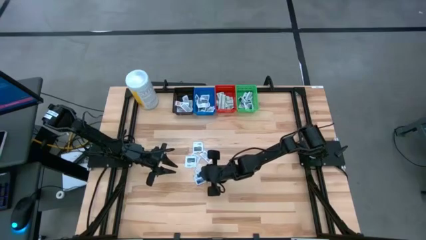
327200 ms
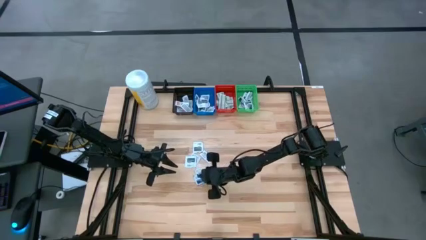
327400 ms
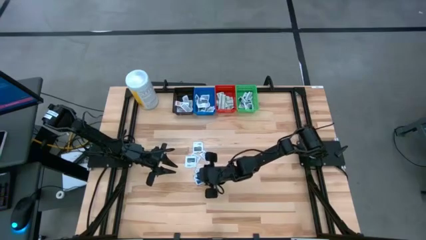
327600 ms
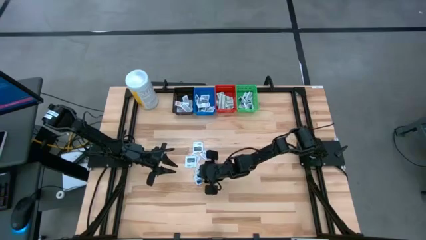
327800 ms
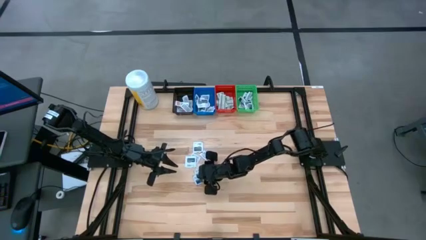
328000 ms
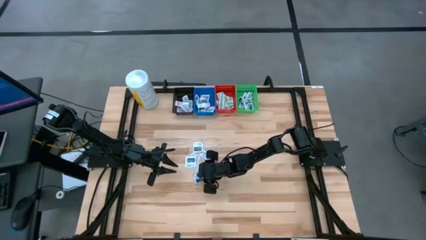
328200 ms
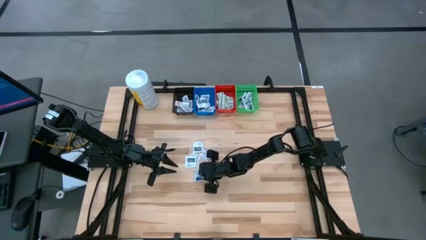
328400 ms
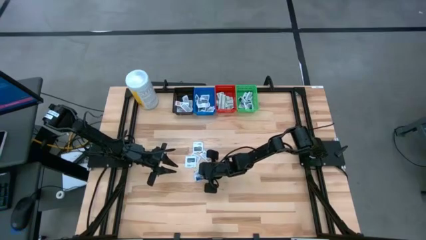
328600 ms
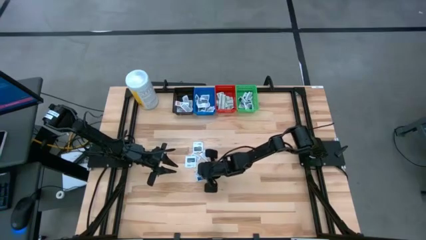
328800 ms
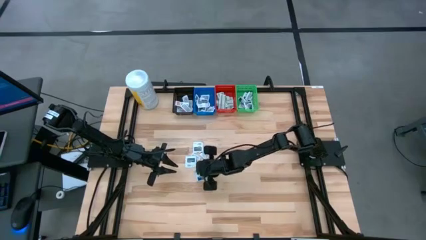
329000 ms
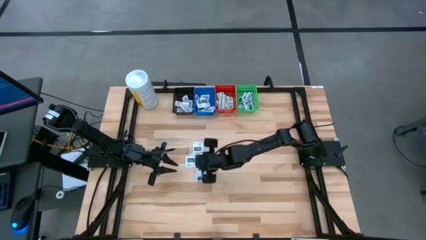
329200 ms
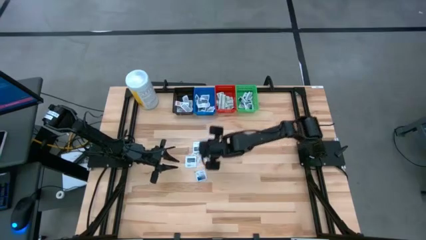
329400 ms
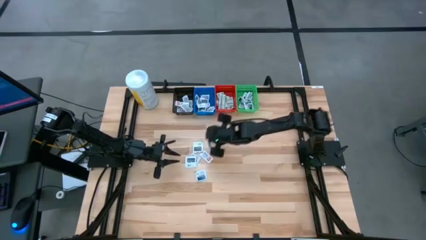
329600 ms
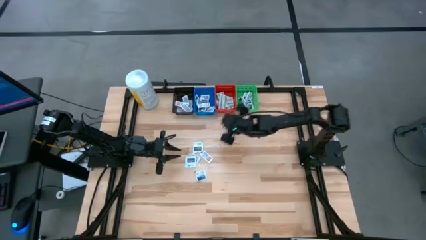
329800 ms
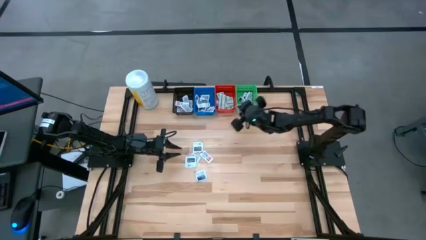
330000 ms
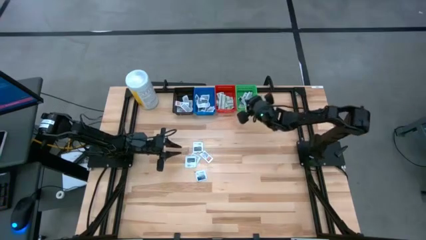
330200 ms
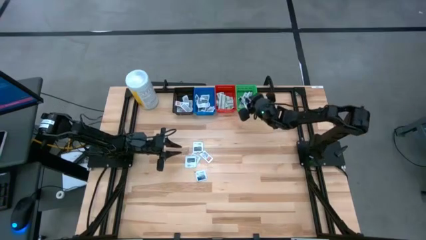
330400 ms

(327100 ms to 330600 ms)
Task: Pick & Place First Aid Supplies
Put the blue alcohol pad into the green bin

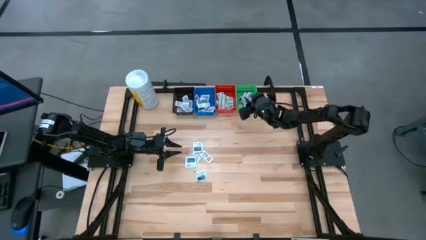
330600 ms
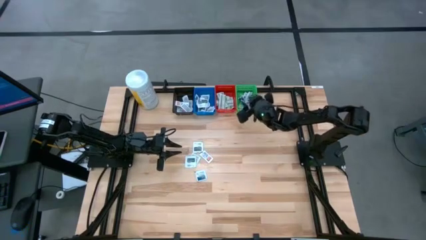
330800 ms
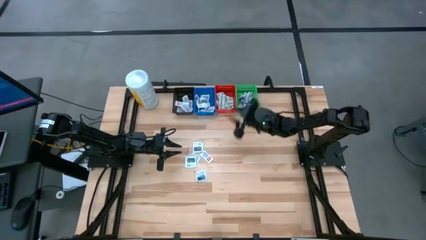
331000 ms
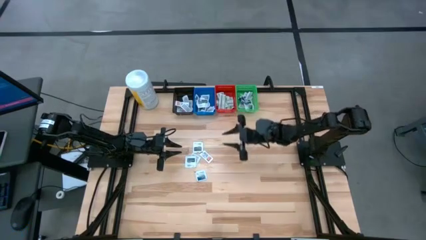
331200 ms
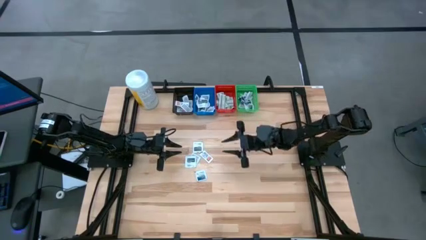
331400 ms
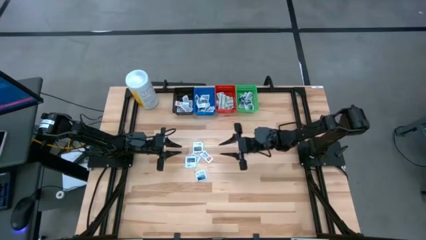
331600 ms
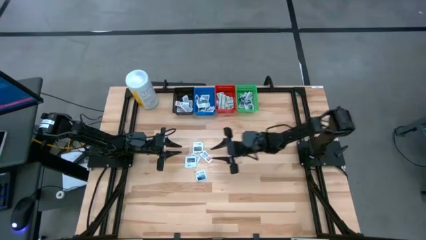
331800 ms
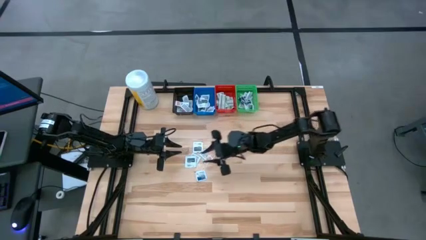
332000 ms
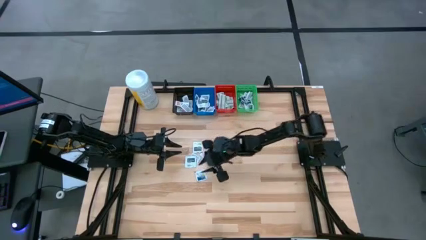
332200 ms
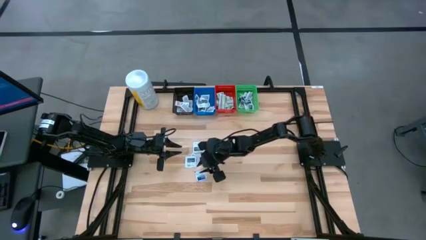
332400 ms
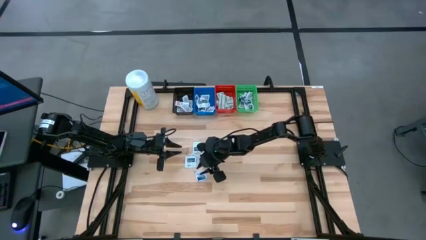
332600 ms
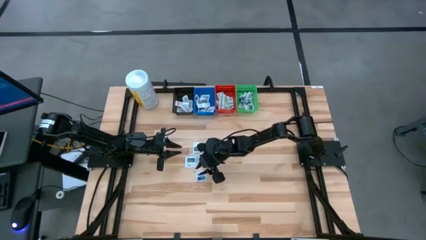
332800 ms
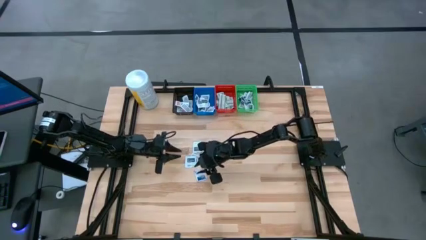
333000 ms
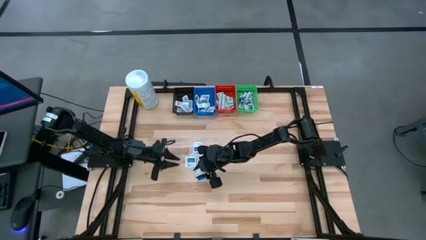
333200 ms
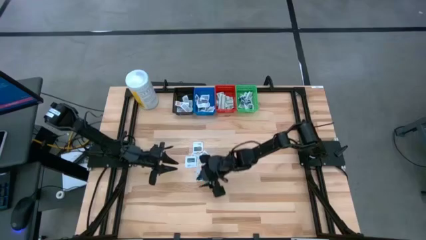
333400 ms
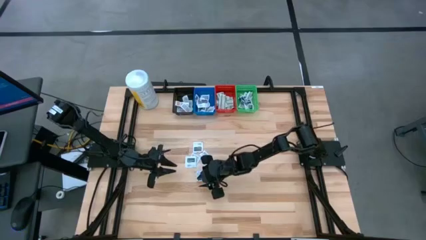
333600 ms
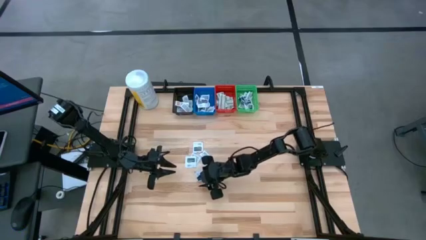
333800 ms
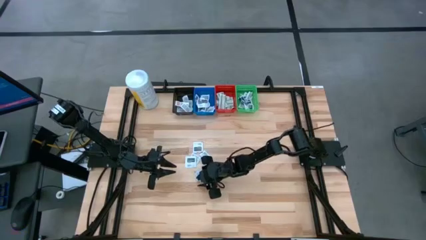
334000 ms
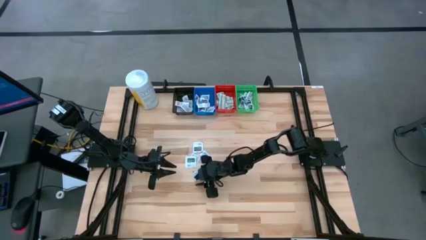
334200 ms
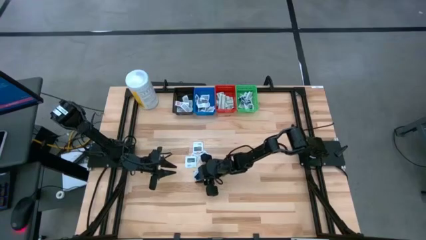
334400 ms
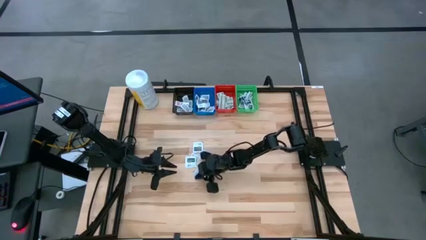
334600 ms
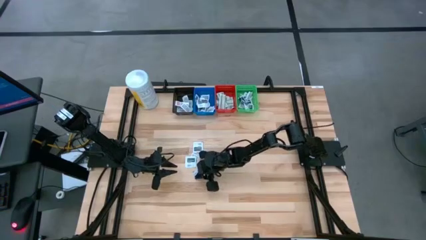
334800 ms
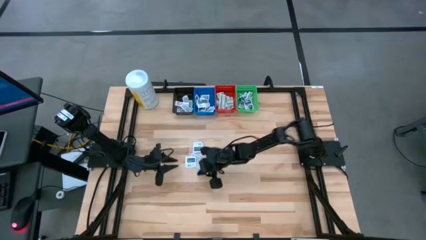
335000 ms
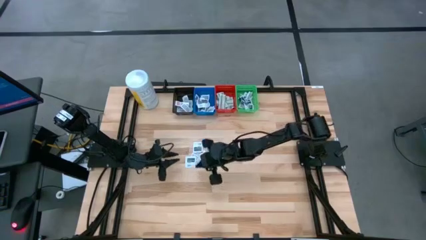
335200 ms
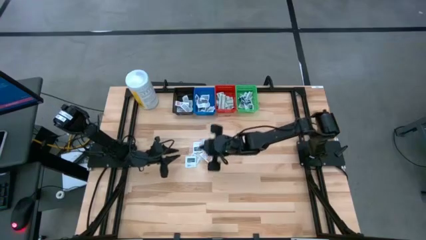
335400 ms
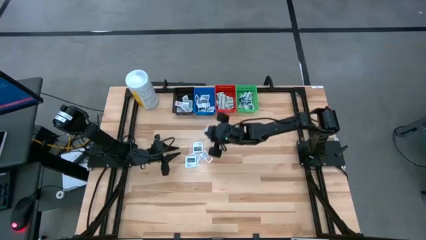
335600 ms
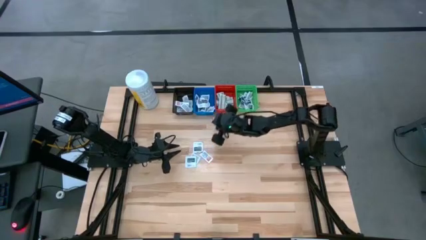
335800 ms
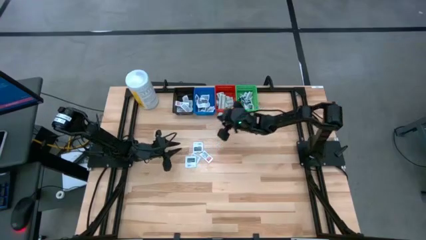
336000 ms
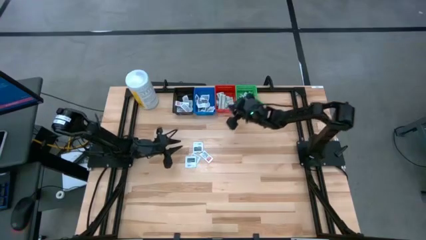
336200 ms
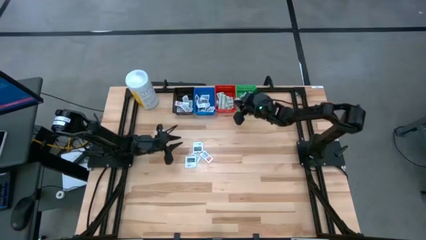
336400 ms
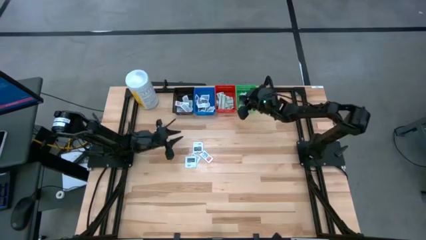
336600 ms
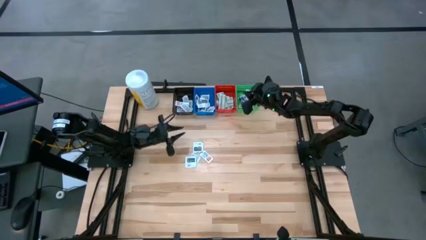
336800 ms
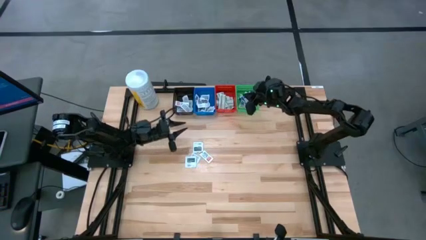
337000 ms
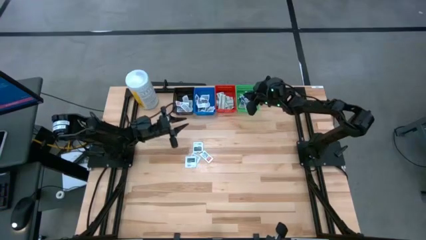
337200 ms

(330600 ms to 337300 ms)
Put the blue alcohol pad into the green bin

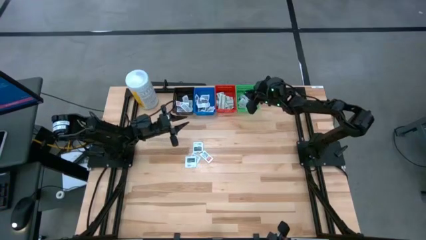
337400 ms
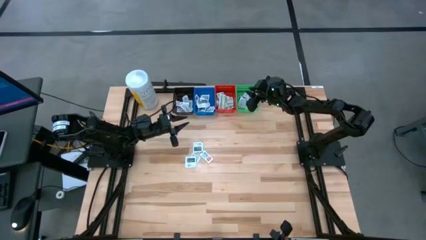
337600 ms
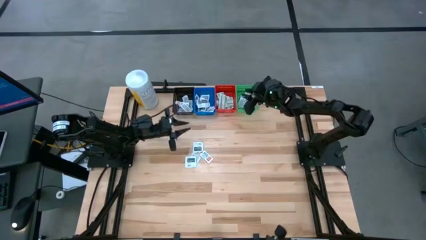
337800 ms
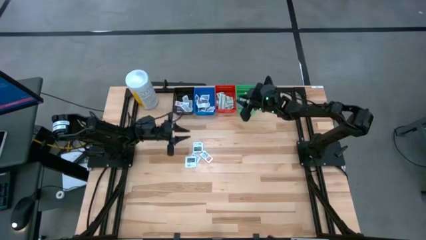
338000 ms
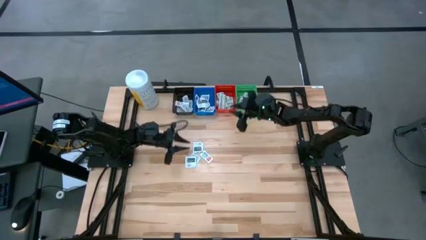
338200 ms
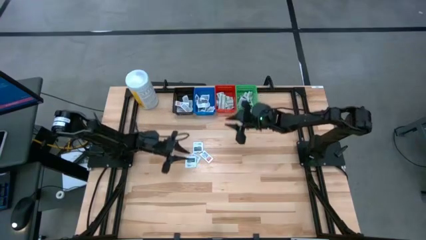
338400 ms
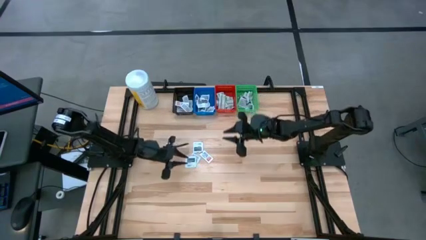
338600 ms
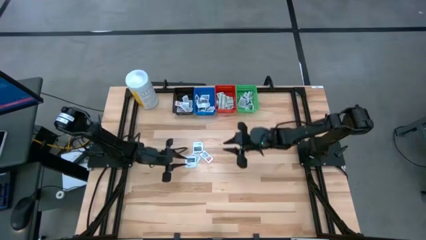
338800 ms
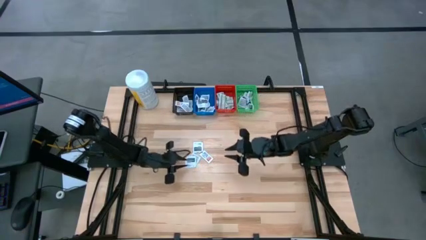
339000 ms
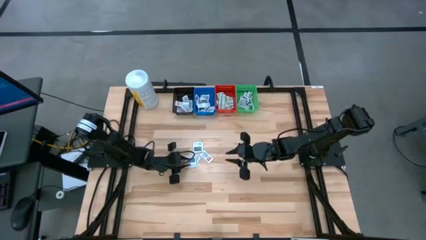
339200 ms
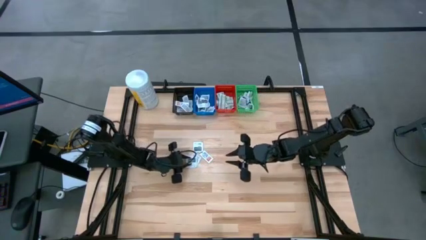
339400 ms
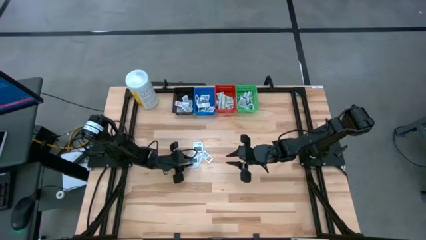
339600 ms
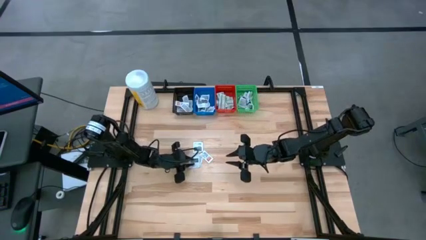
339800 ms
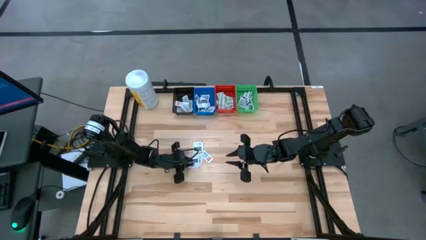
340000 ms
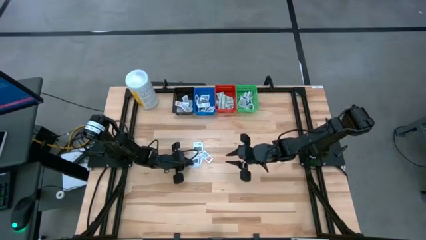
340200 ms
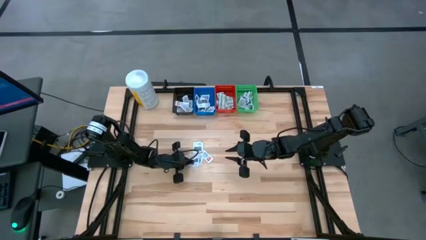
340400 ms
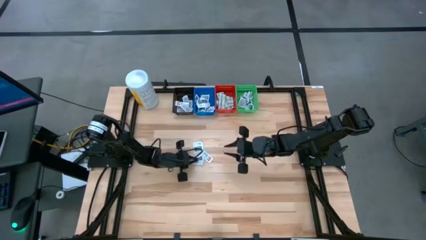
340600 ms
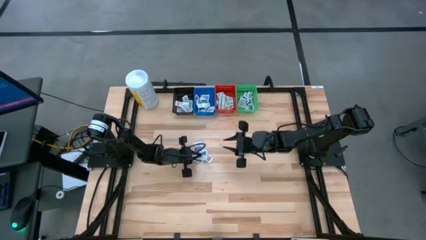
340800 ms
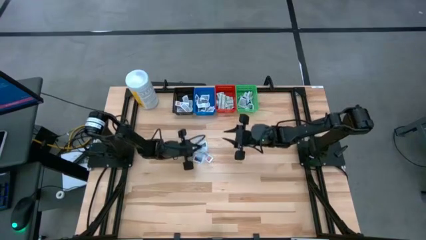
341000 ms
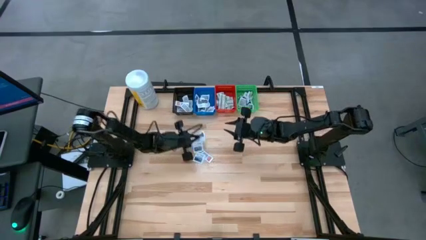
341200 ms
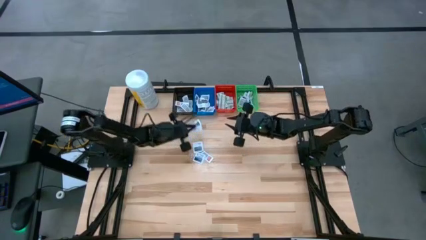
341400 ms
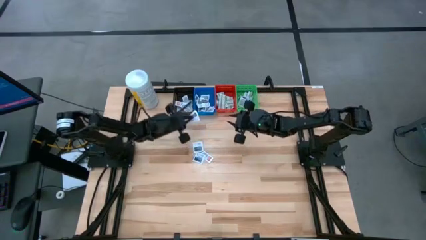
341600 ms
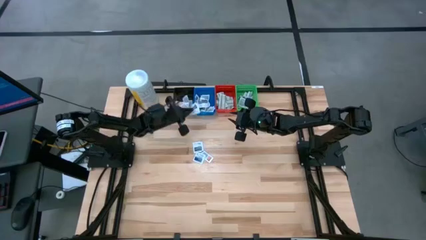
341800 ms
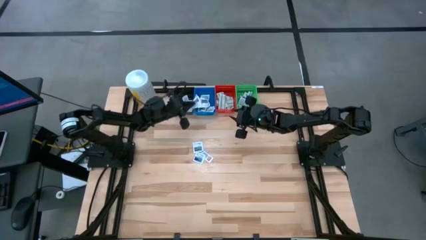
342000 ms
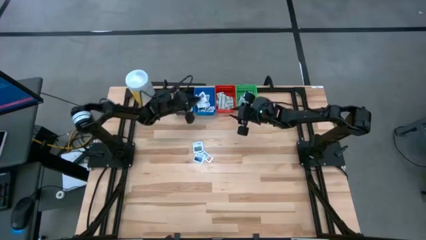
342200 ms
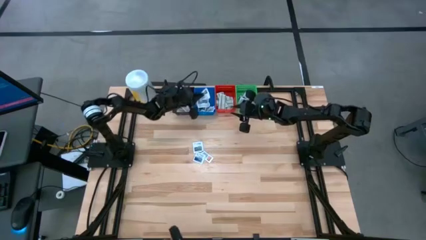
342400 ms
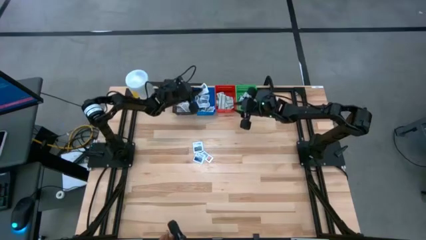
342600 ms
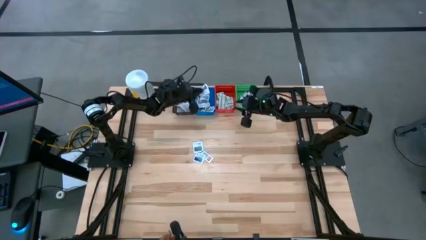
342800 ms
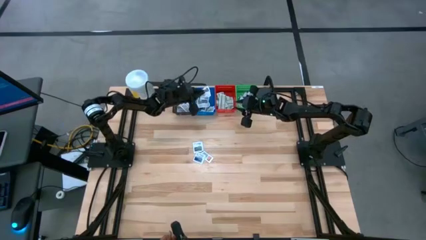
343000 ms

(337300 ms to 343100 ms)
Put the gray towelette pack into the blue bin
